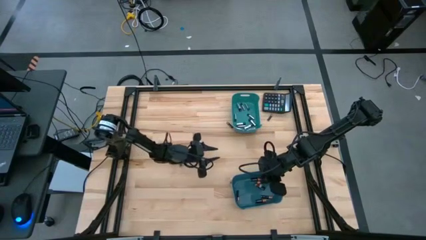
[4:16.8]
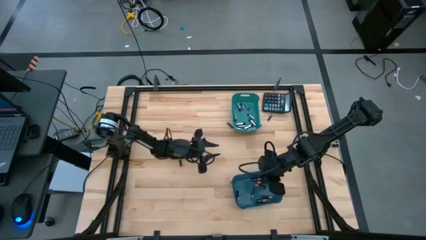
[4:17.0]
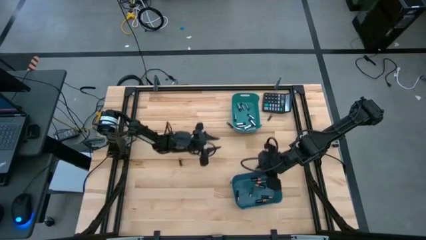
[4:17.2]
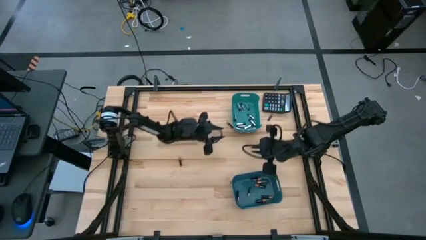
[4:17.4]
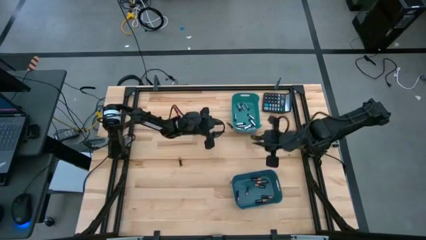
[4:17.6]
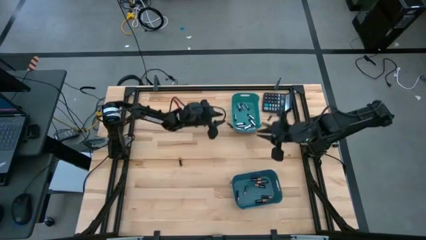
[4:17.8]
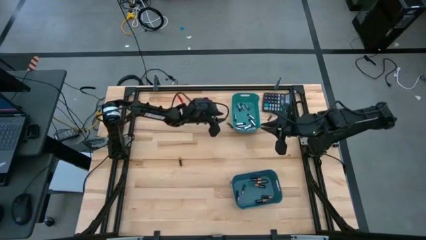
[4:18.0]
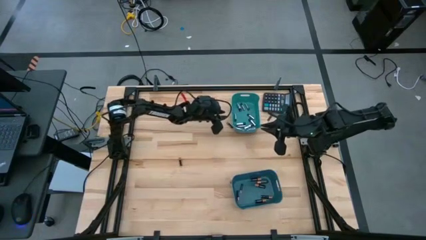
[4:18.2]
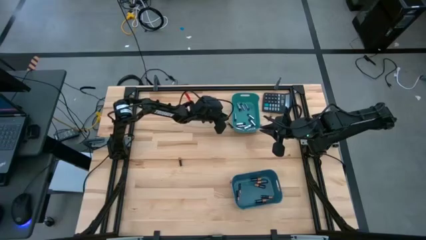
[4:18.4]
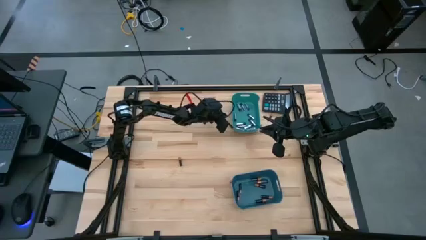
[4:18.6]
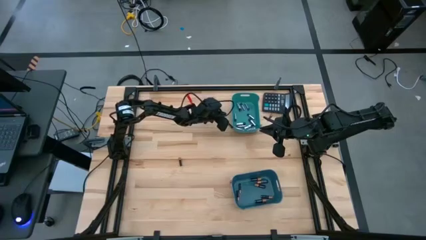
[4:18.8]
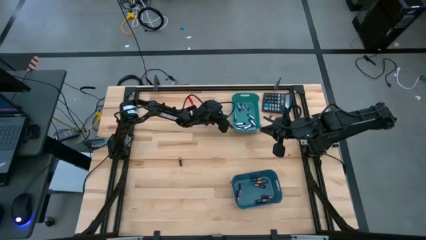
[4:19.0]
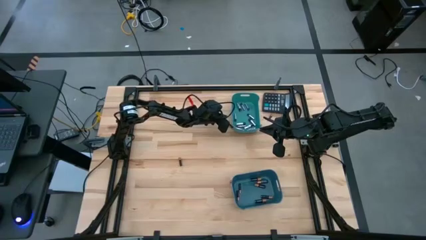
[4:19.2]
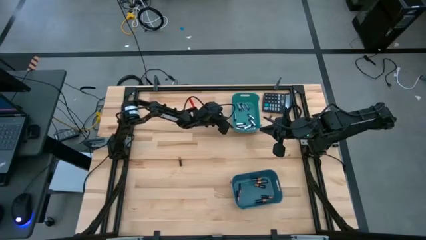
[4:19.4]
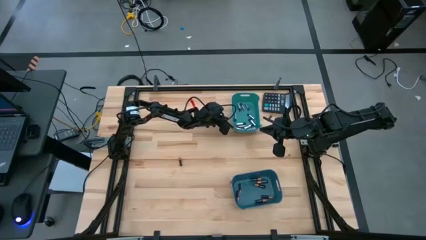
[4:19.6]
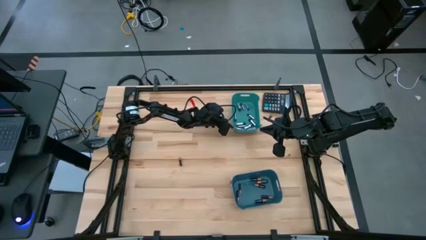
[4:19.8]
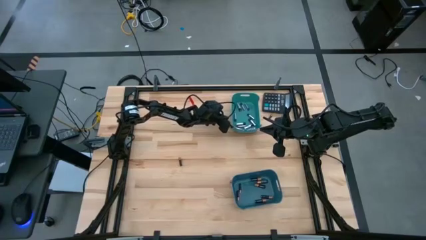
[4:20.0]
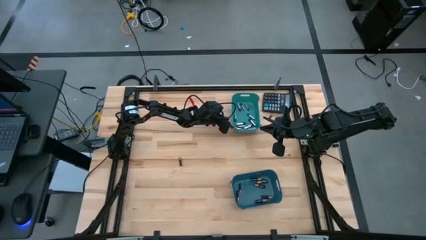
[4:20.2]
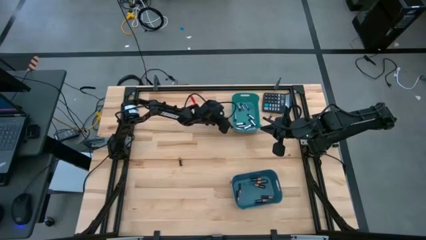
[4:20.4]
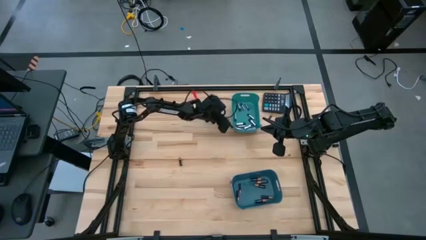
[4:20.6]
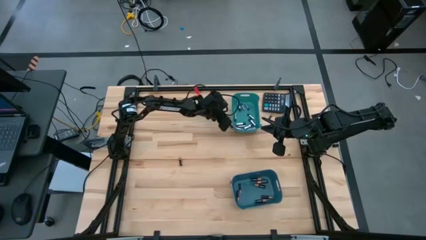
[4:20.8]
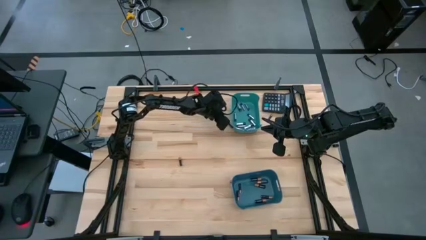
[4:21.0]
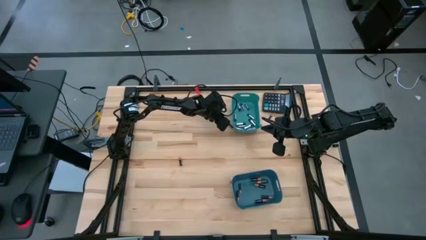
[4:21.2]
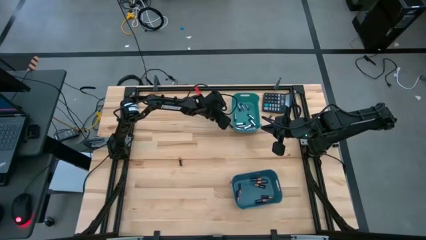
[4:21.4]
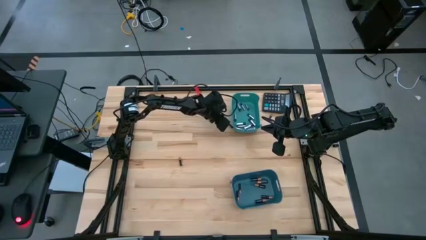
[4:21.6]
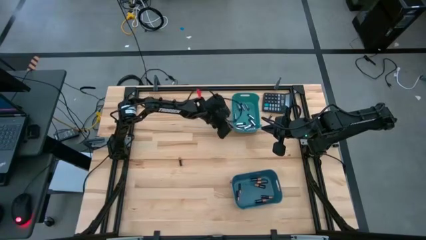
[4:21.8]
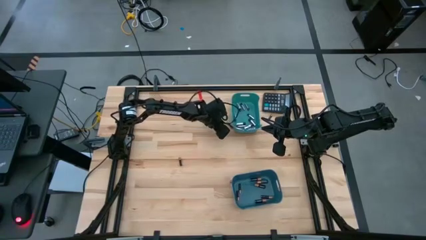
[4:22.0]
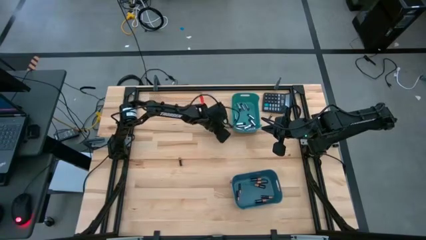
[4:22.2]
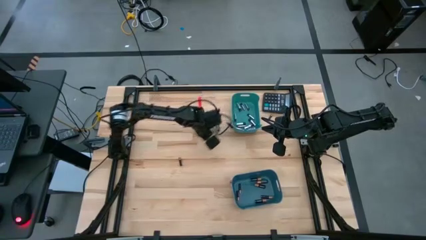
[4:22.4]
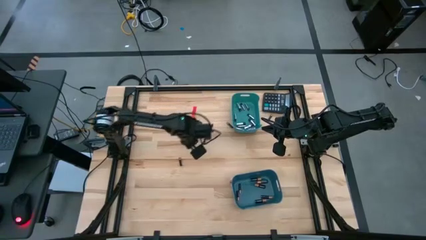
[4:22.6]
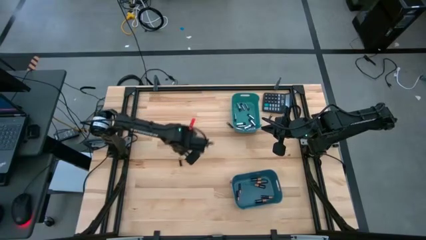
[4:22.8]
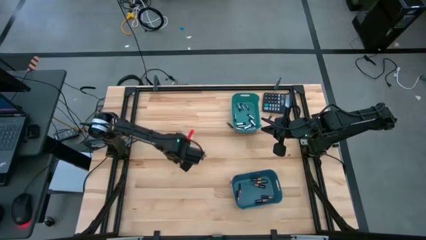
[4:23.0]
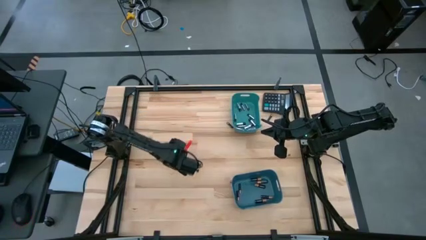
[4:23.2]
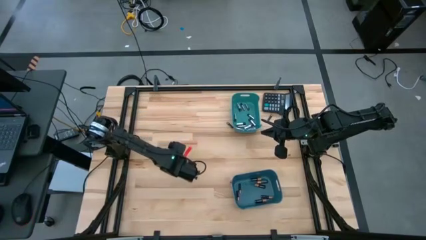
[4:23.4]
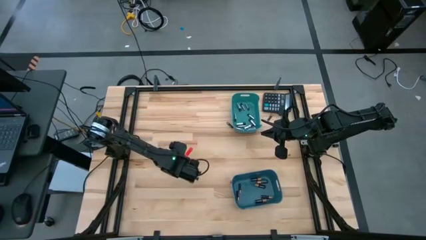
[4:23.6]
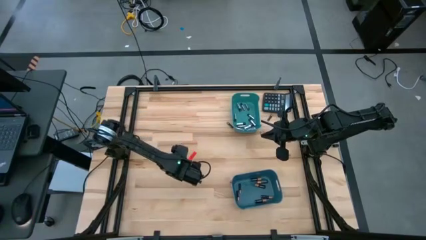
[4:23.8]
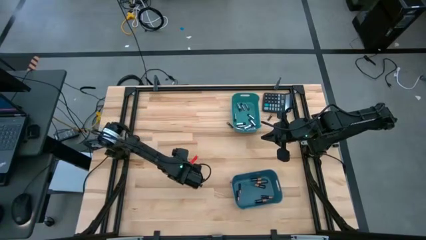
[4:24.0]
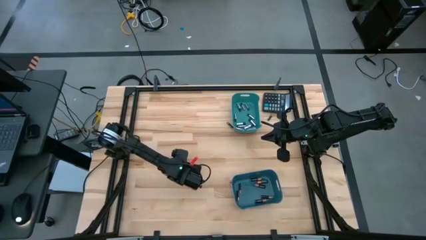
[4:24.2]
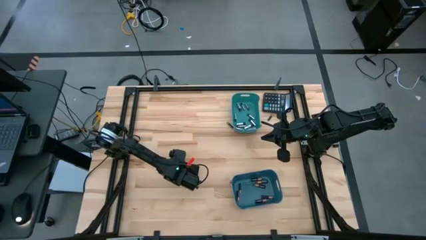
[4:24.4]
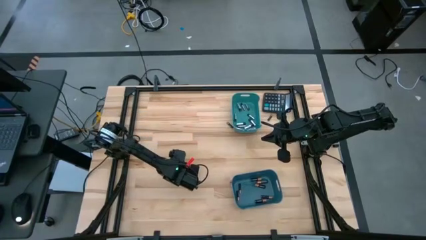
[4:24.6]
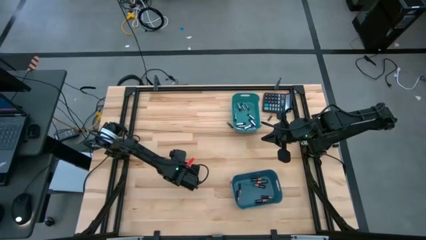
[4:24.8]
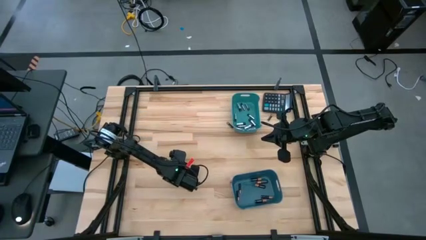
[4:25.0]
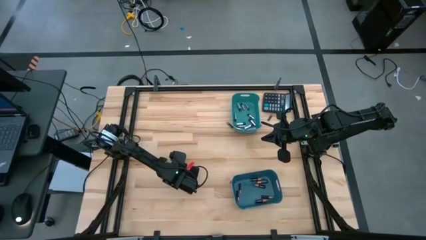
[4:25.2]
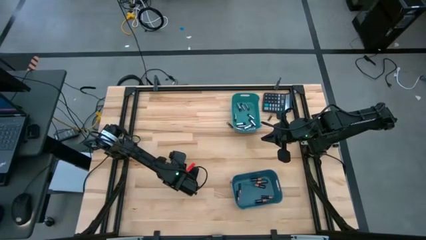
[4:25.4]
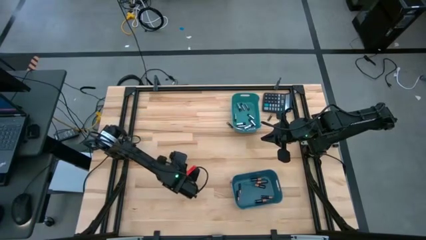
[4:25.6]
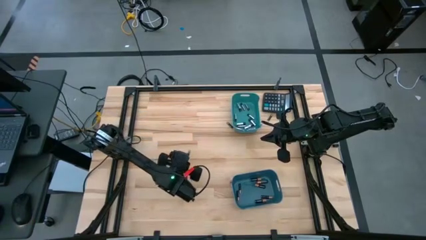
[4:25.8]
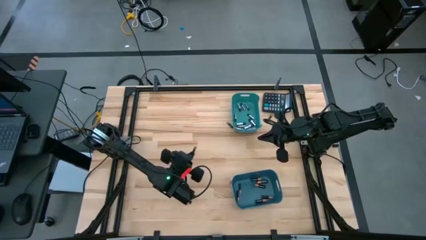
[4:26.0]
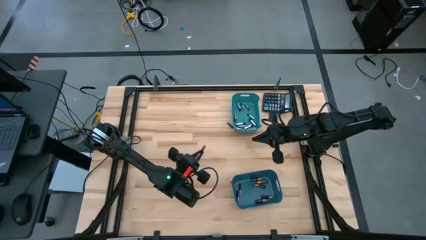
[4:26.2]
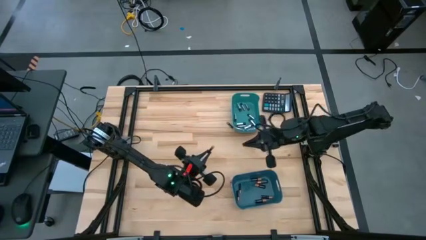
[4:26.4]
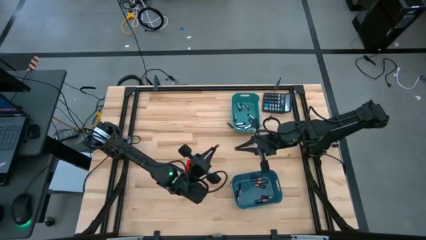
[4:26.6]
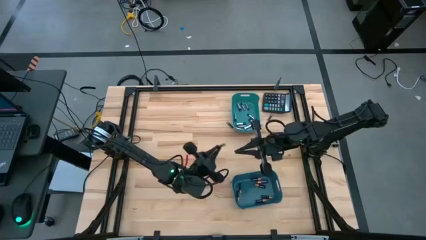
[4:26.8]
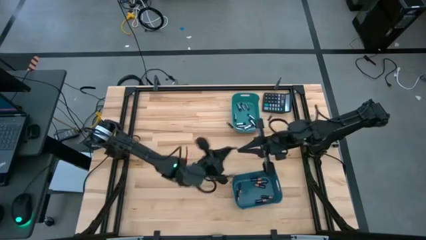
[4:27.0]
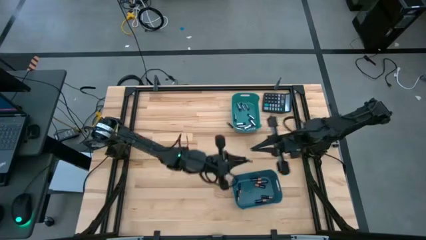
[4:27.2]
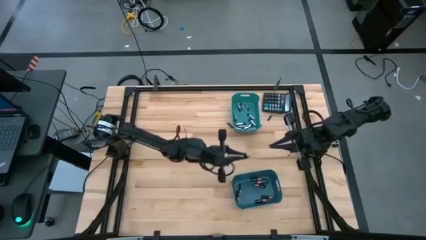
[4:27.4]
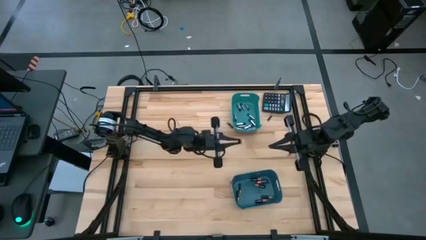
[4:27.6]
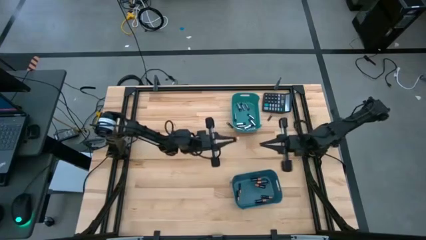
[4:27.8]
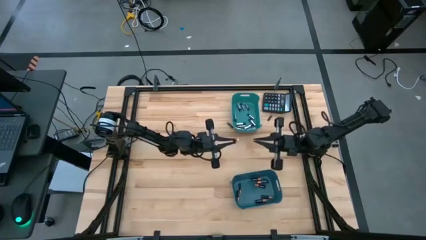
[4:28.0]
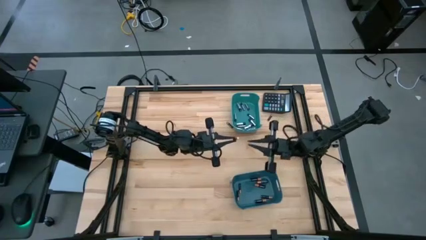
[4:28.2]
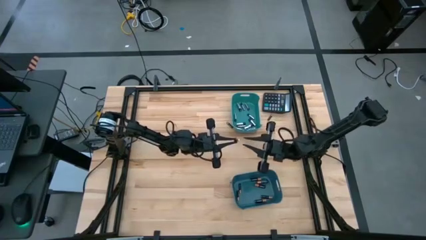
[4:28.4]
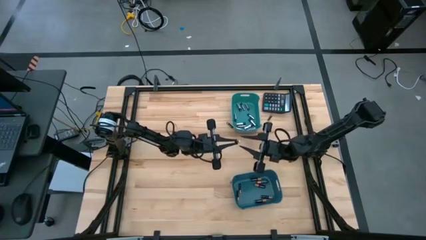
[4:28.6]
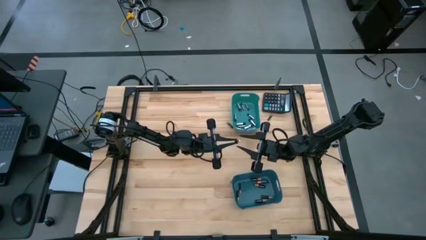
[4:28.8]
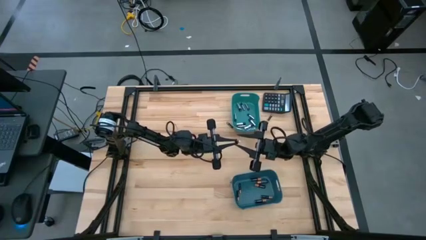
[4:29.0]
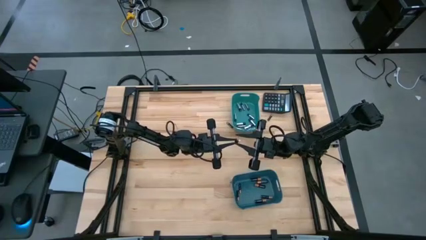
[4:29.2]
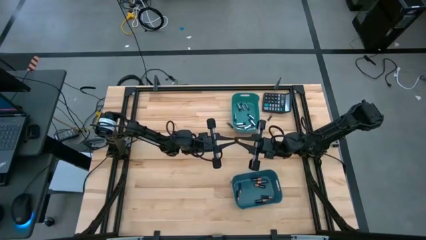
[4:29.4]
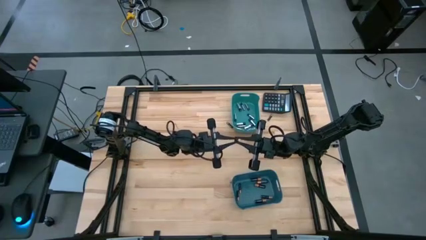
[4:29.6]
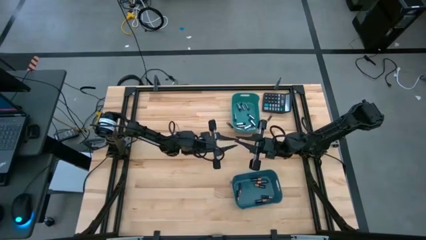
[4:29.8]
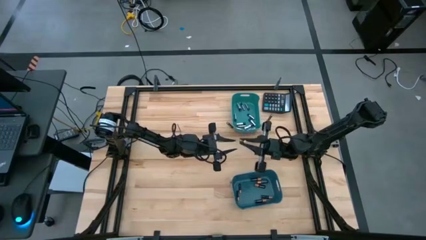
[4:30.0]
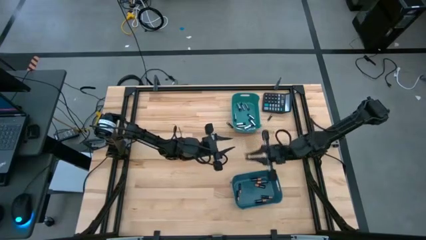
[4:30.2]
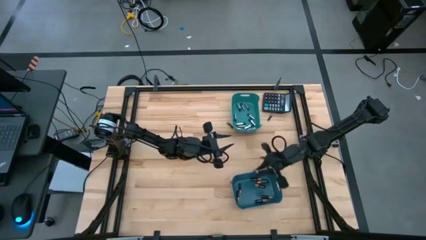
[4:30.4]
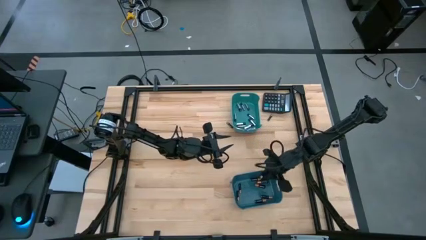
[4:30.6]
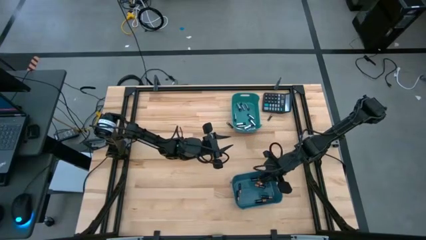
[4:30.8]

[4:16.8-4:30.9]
Task: Sort batteries
Put the black battery into the blue bin

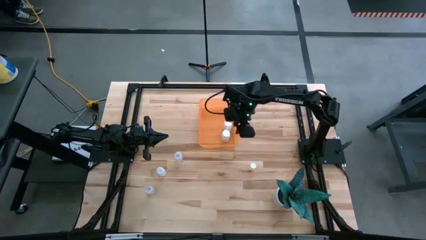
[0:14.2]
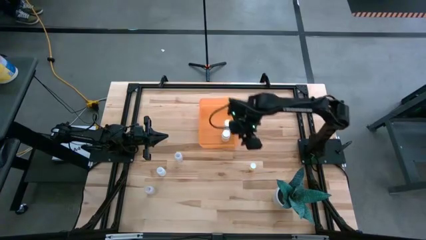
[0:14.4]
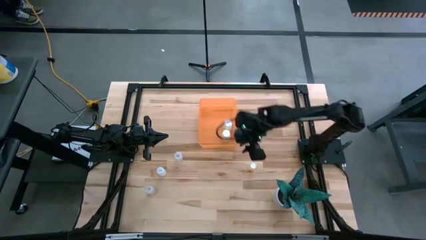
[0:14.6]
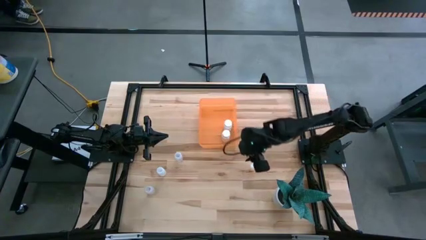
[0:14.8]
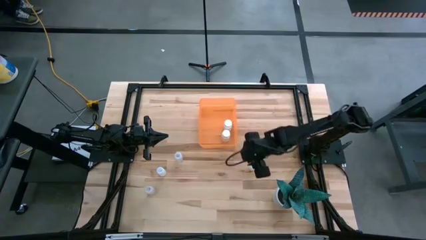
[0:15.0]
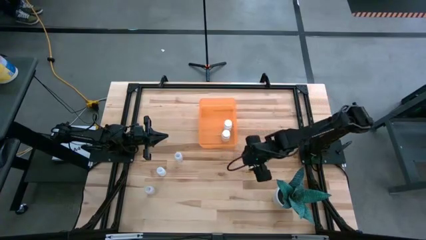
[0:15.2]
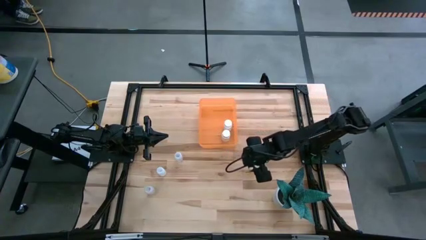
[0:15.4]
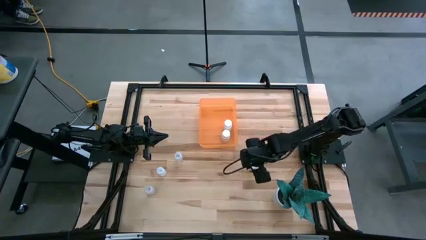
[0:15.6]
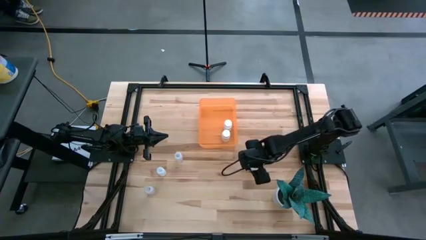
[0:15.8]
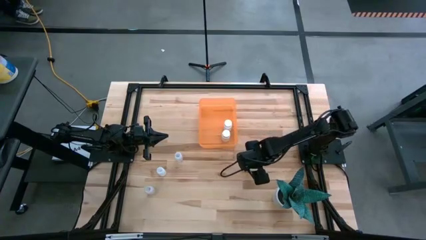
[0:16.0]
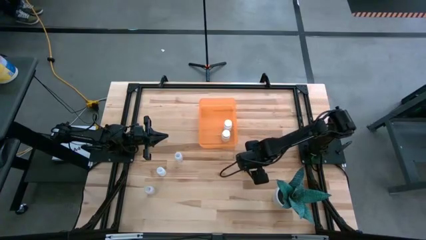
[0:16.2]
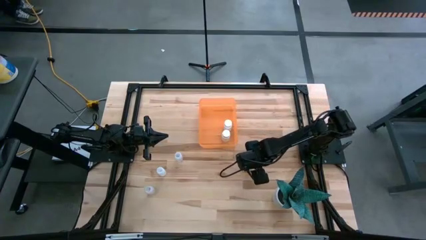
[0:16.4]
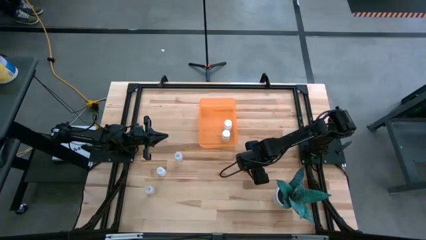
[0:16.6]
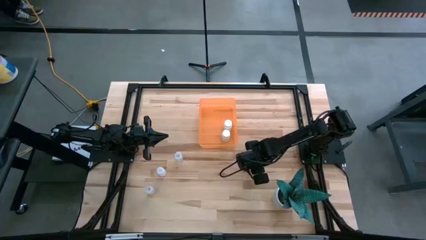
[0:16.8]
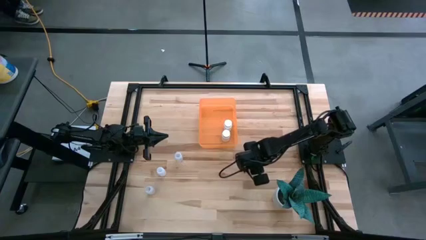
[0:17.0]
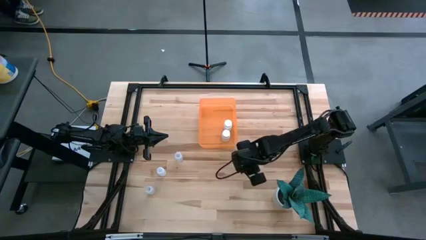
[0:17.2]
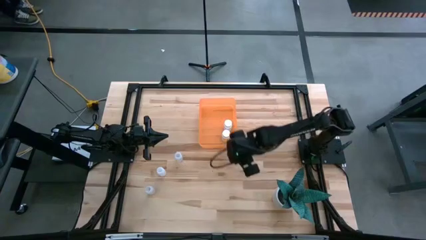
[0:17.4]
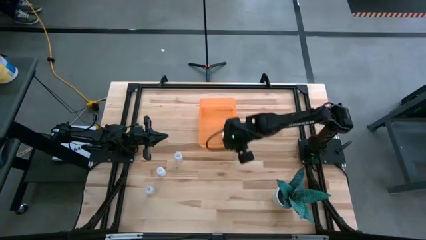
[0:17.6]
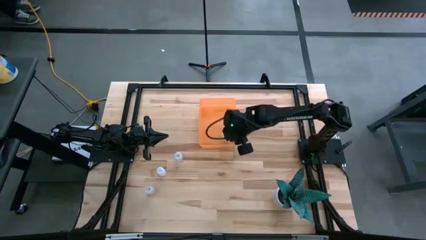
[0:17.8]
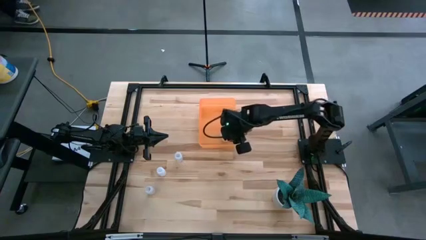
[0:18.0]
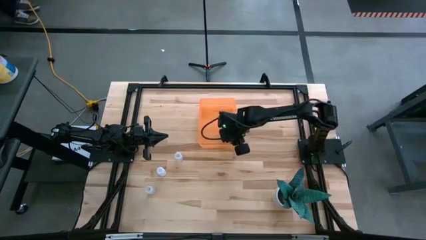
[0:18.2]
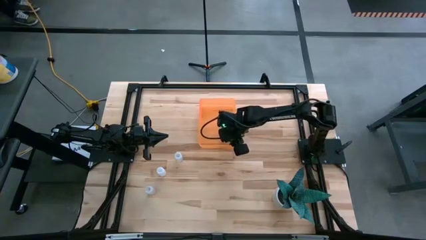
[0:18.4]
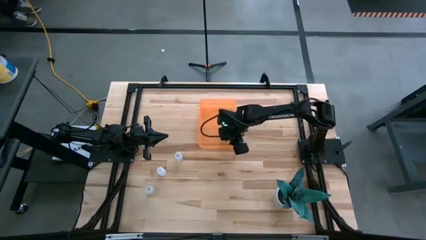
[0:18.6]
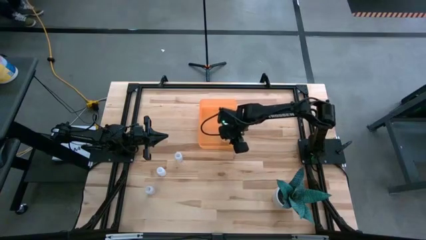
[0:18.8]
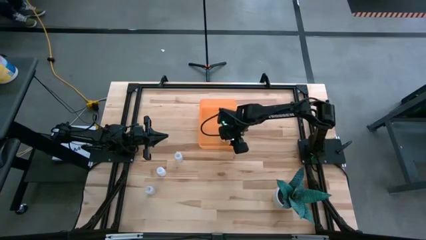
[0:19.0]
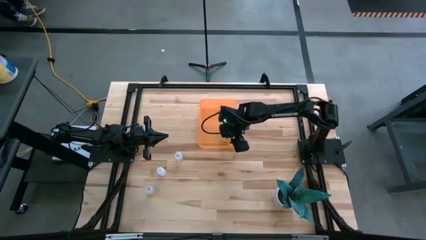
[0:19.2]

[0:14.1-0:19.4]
Task: Pick and place pill bottles into a basket
Put the yellow medicine bottle into the orange bin
